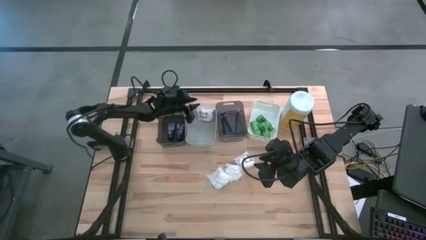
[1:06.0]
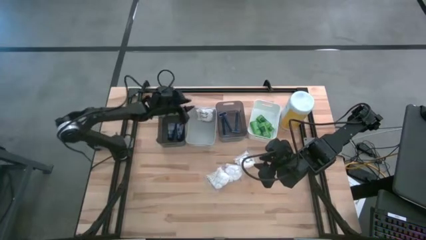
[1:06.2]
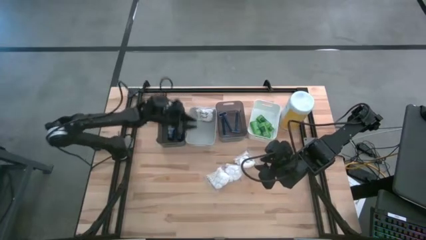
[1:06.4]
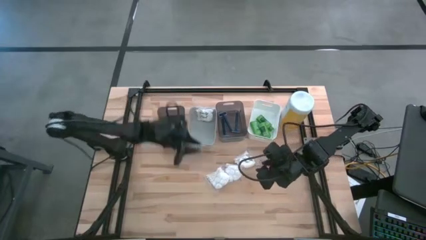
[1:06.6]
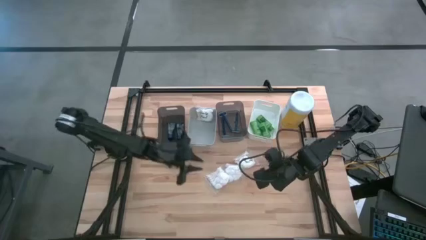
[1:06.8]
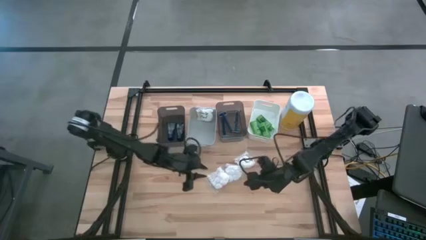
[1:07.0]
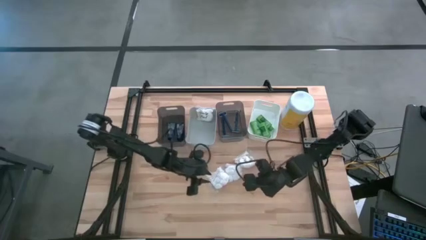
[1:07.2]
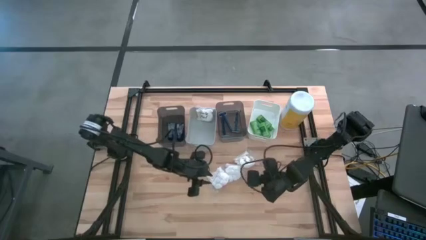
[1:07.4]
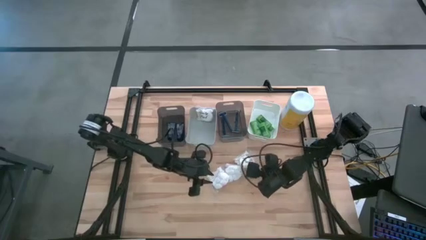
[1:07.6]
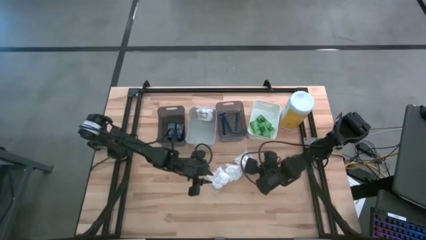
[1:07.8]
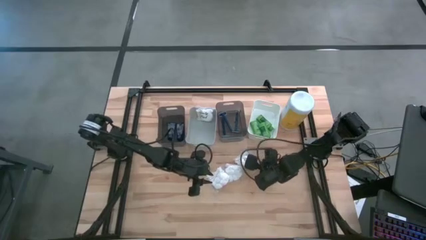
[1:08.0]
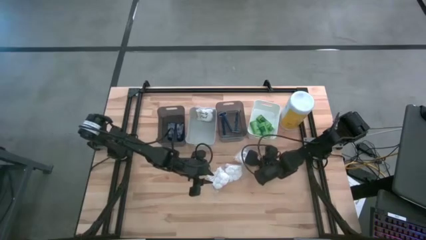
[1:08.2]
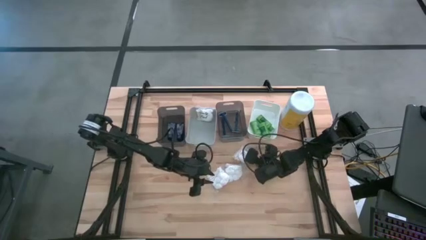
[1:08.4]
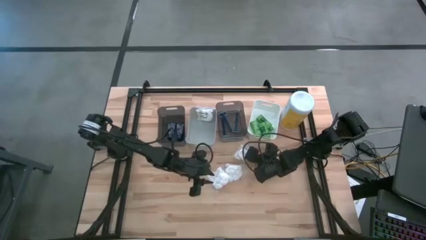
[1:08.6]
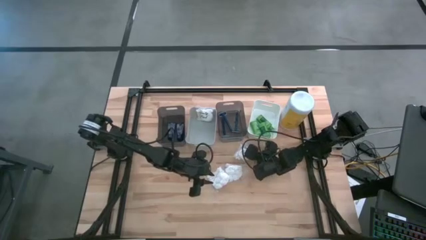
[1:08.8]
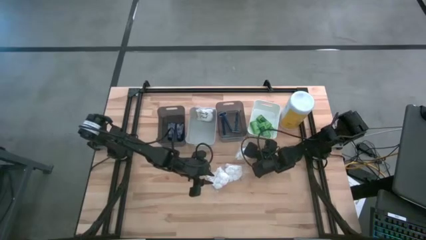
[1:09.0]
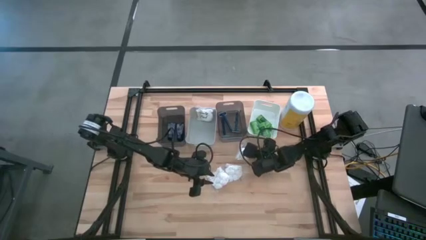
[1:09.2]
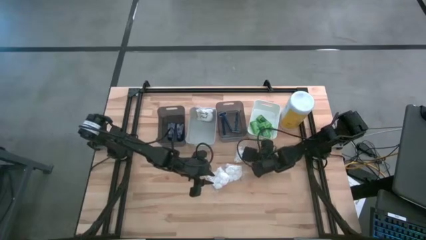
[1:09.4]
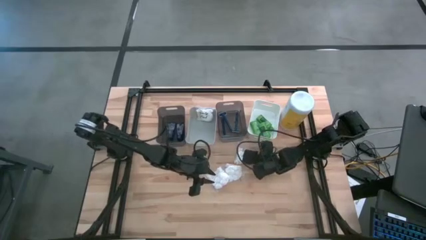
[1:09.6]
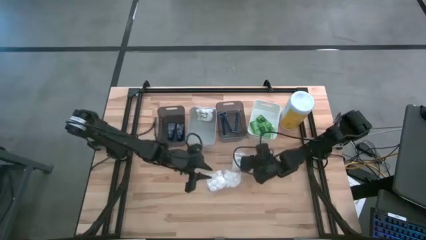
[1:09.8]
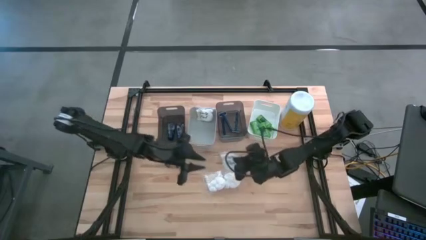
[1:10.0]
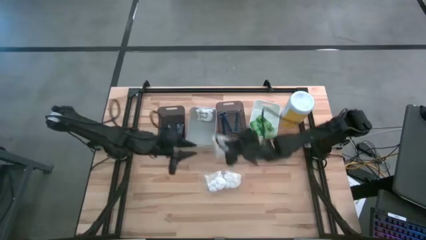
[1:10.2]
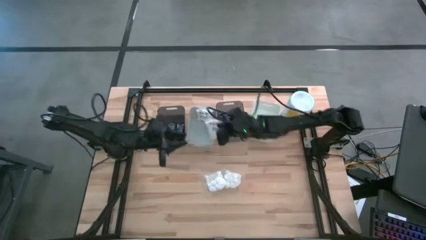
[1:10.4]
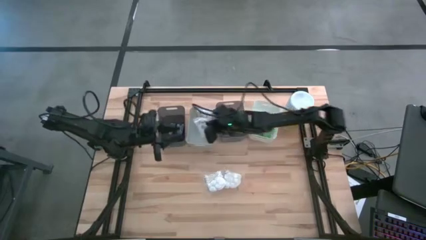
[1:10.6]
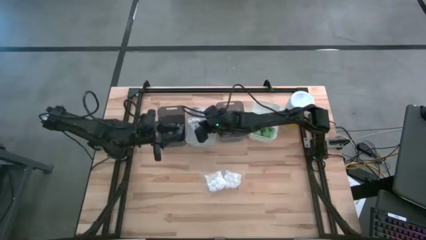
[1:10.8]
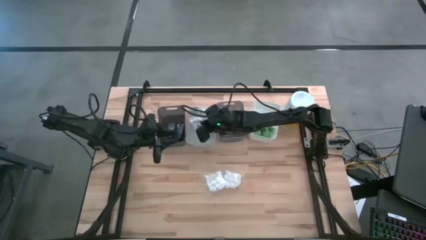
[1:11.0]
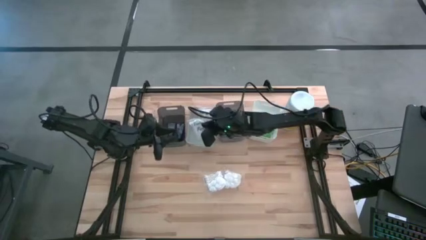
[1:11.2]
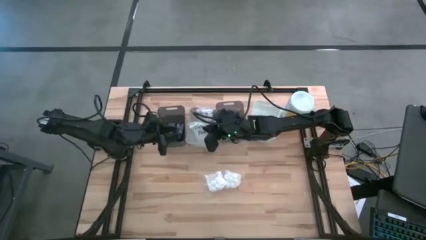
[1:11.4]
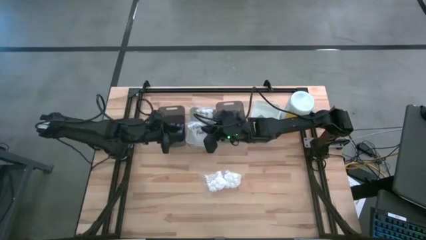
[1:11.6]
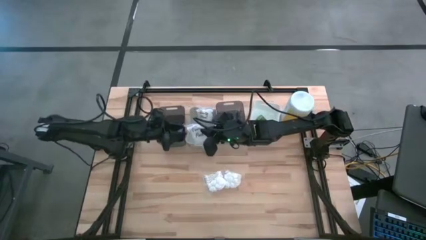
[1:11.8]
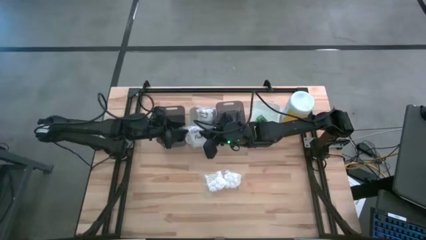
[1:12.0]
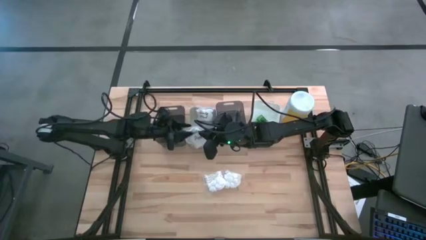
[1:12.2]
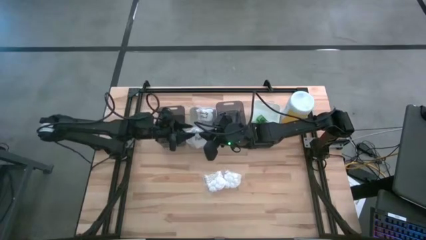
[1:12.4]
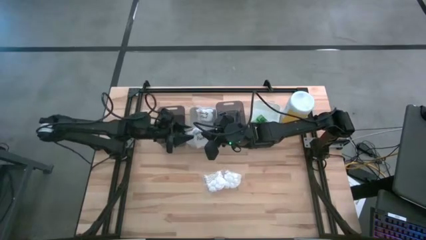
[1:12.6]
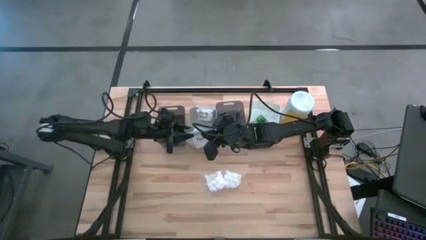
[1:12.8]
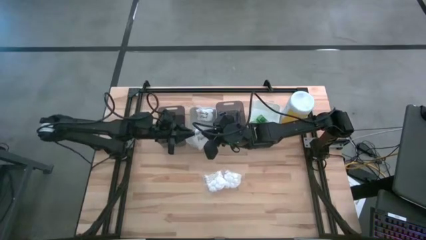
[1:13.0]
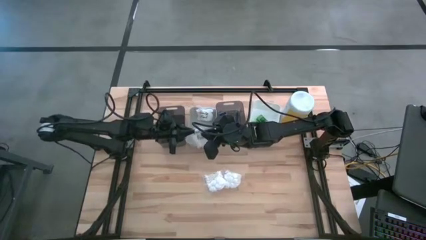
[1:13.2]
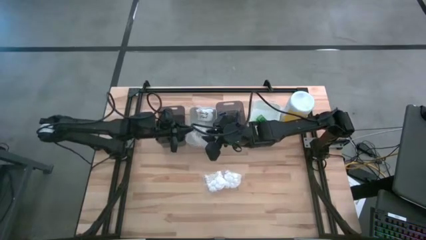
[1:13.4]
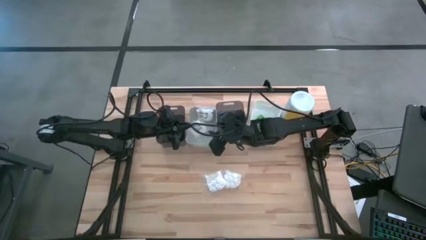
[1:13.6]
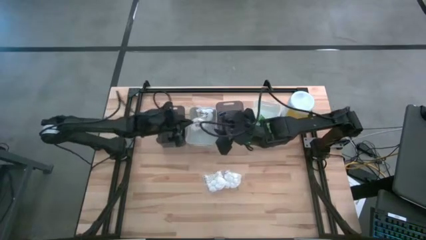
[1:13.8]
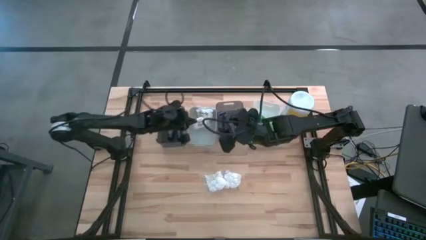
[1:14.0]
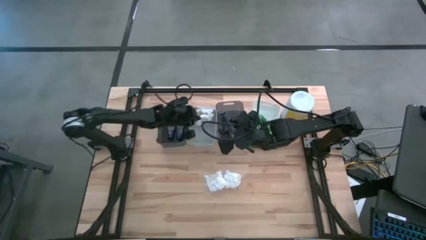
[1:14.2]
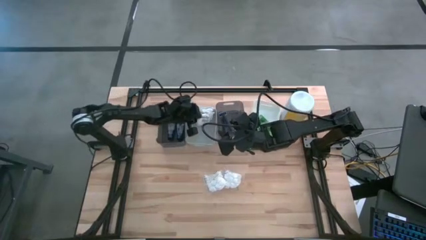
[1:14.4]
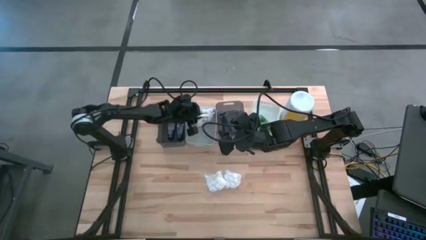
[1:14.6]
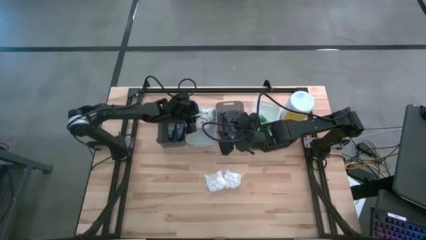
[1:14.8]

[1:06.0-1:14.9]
Task: Pick & Place Travel size toiletries
Put the white cotton pack into the gray bin

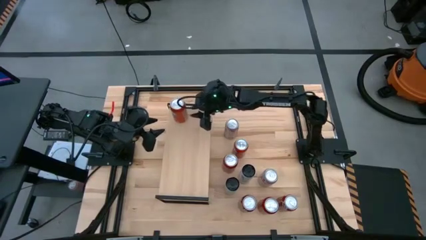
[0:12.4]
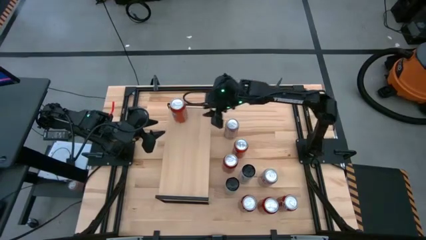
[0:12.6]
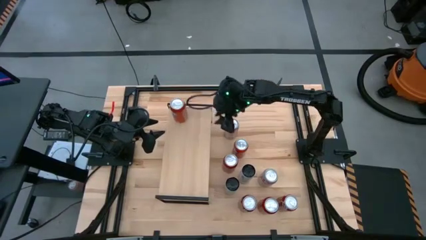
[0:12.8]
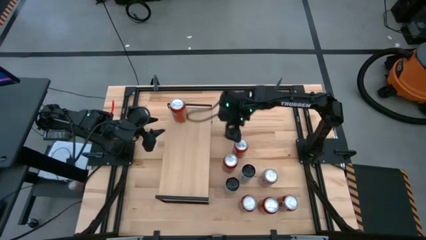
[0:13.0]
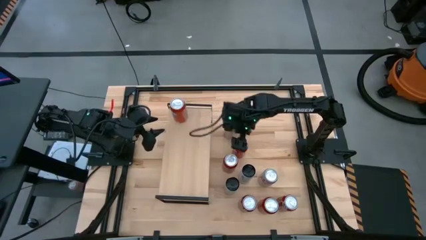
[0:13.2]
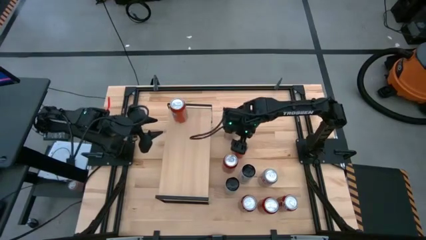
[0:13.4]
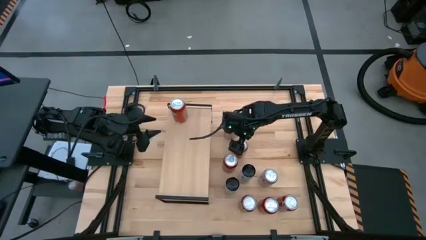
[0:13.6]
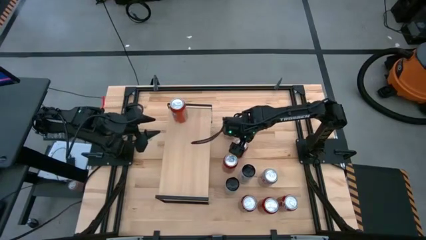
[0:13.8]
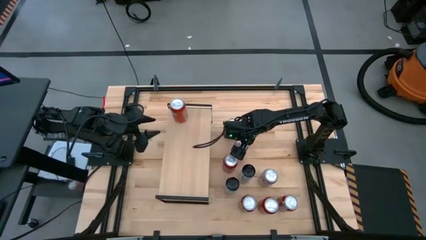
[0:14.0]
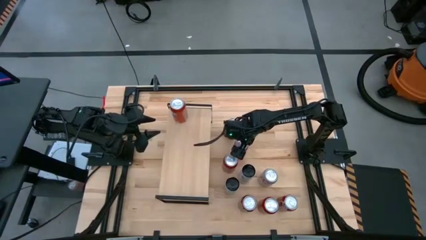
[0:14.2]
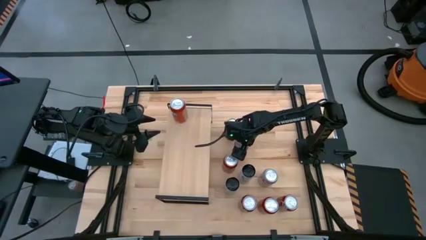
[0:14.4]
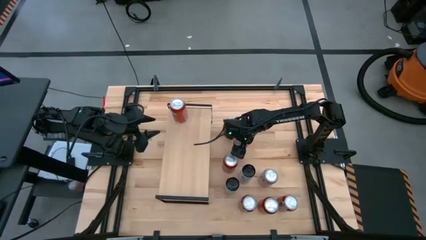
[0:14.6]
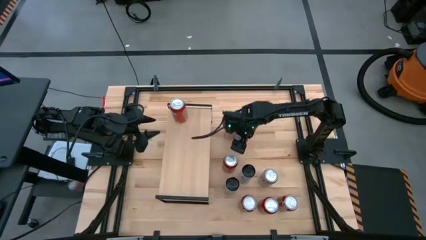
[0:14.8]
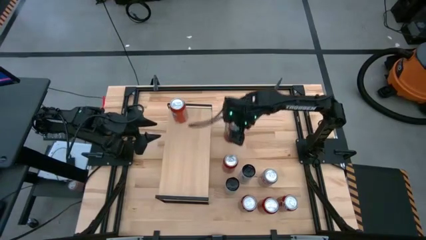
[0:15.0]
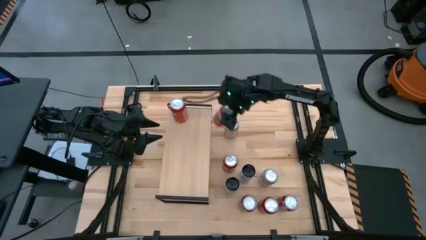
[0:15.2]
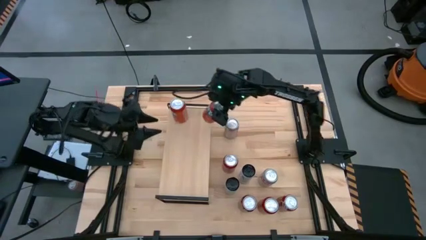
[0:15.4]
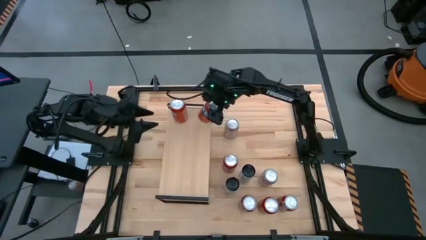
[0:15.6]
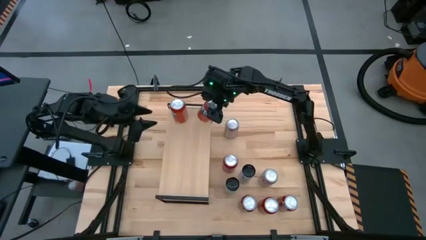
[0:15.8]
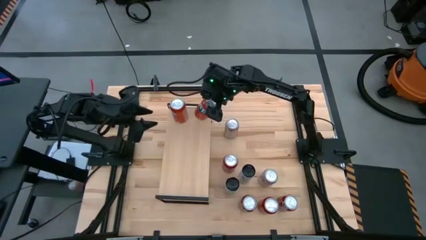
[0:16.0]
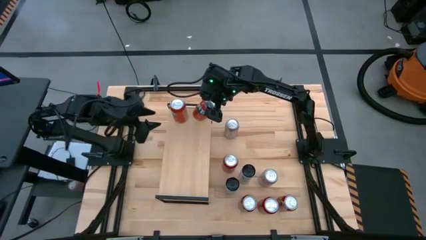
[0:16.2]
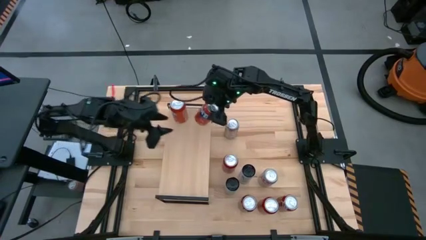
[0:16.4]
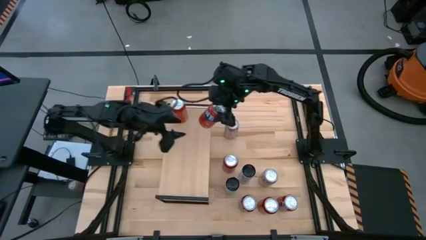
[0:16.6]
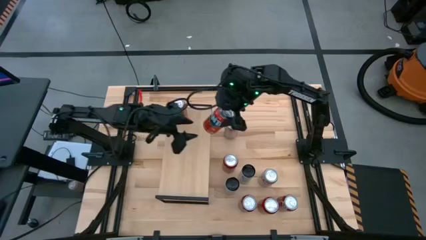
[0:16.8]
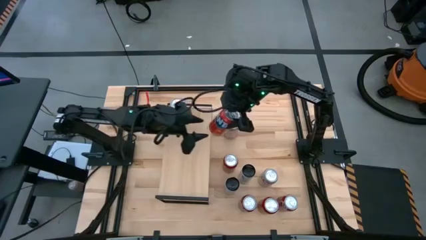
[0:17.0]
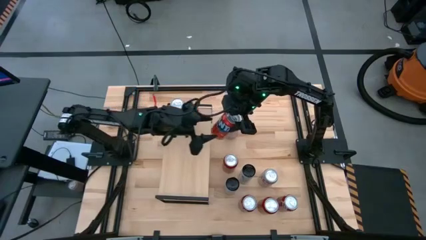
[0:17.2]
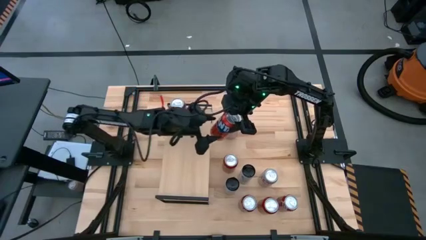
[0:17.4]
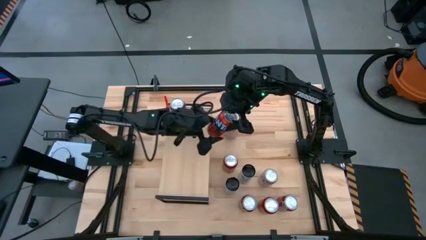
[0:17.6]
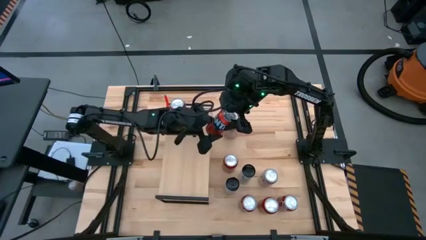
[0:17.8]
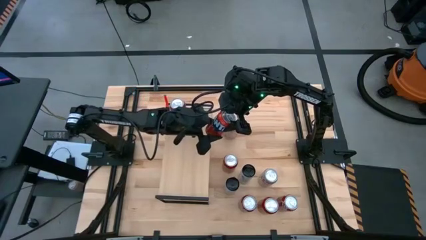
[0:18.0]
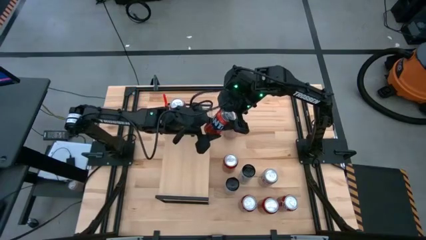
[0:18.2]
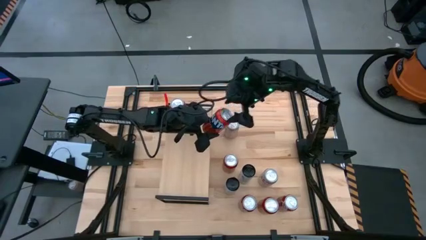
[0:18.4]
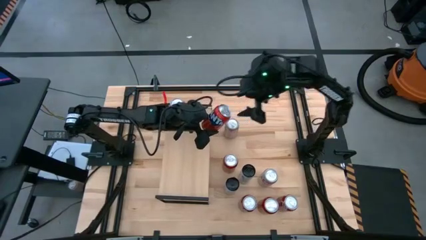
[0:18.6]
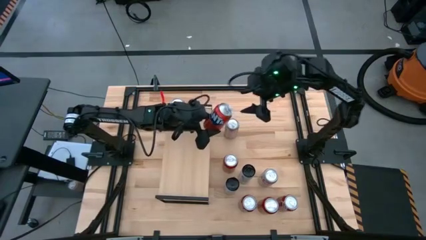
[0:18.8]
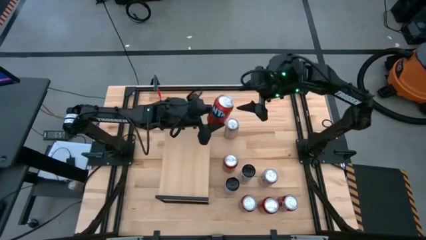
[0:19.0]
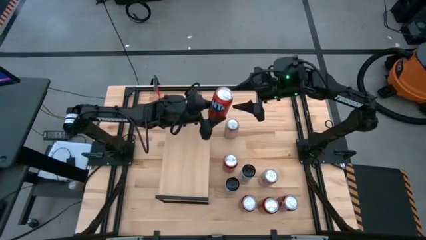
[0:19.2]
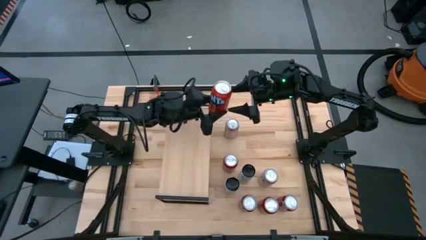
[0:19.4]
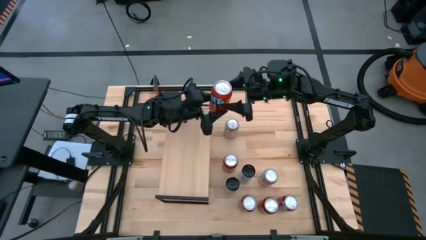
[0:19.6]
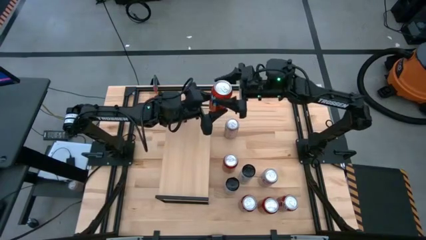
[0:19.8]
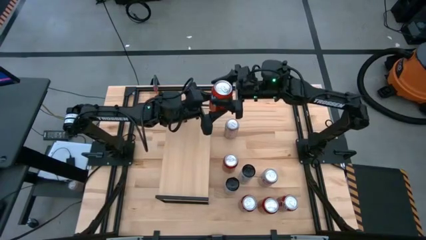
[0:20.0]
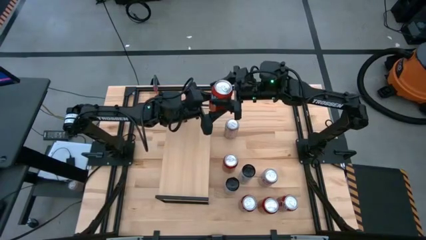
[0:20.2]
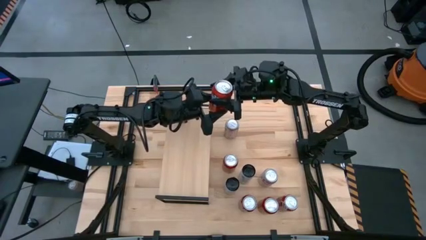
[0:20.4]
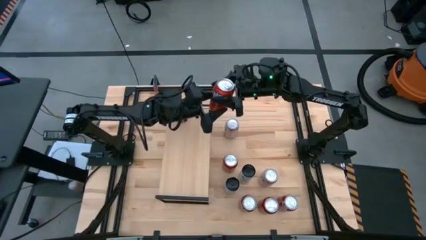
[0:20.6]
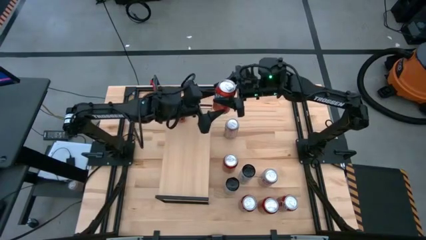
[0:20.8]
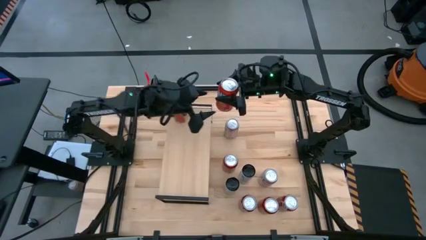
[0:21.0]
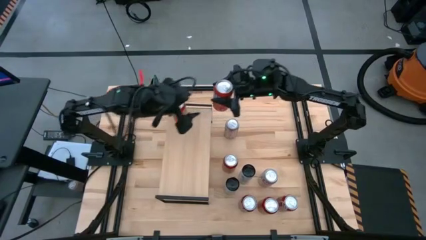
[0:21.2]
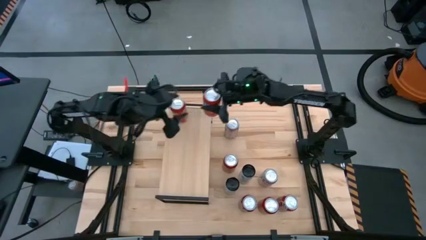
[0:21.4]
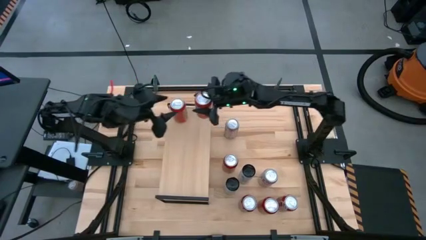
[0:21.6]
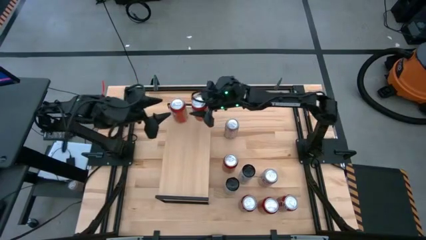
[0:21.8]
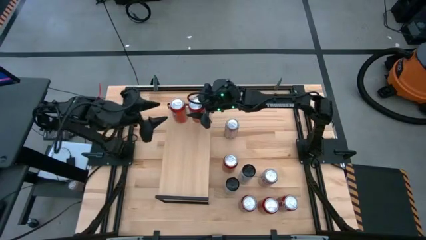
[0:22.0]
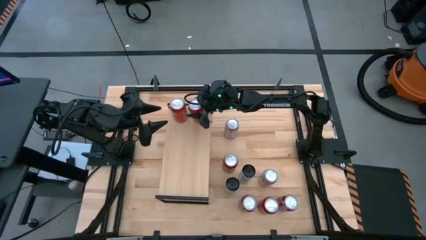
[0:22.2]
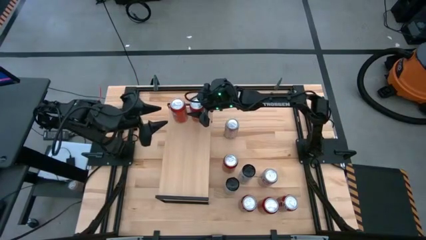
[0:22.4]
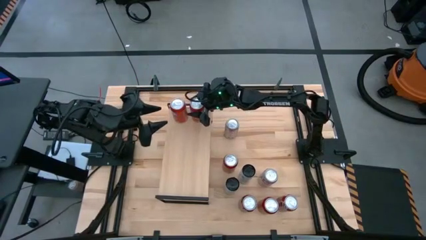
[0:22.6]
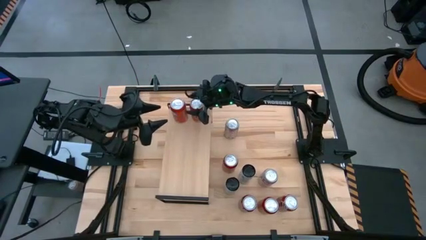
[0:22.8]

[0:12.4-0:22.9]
Task: Pick and place cans onto a shelf
Put the orange soda can on the shelf aligned with the other orange soda can
